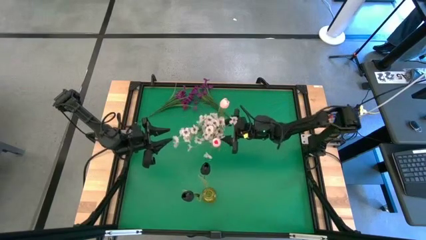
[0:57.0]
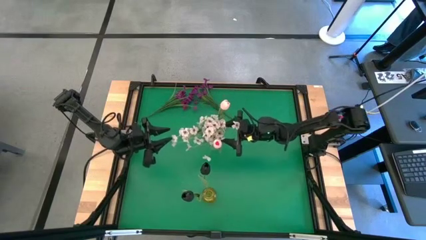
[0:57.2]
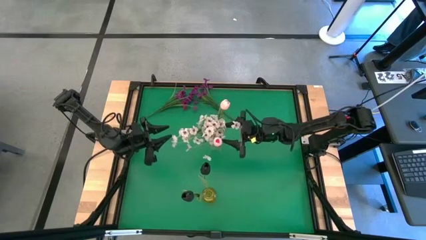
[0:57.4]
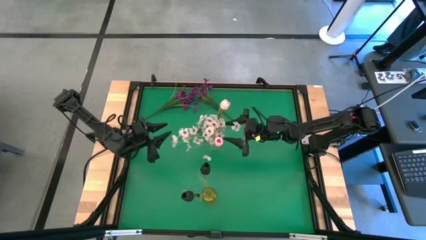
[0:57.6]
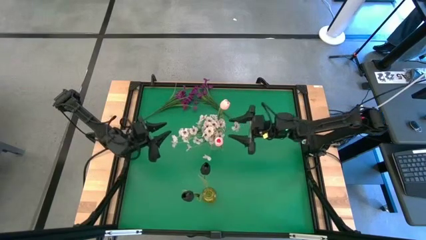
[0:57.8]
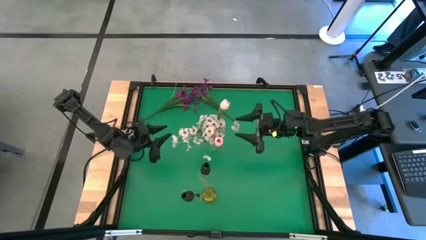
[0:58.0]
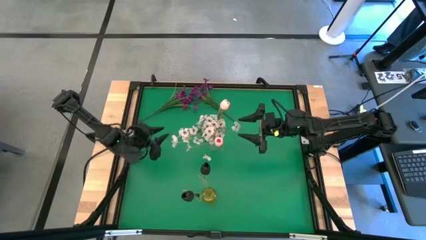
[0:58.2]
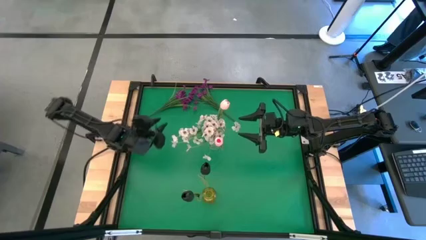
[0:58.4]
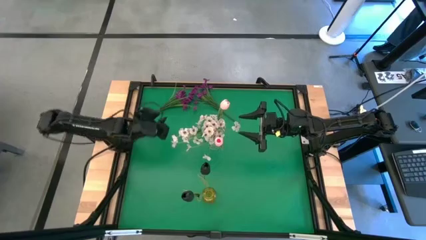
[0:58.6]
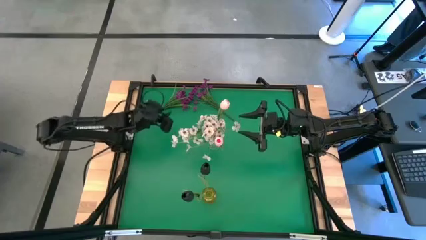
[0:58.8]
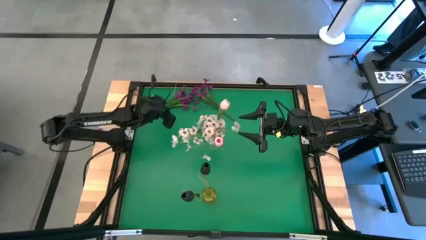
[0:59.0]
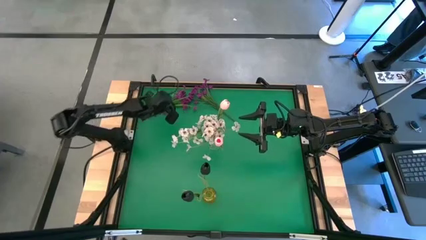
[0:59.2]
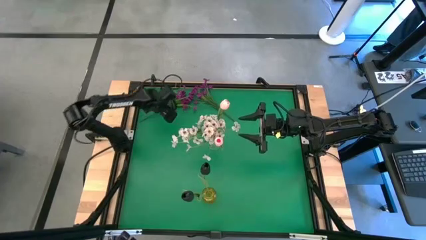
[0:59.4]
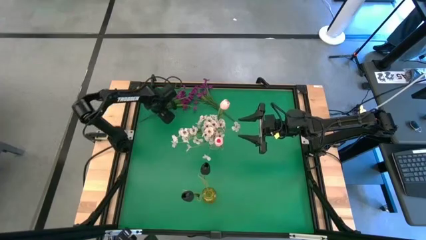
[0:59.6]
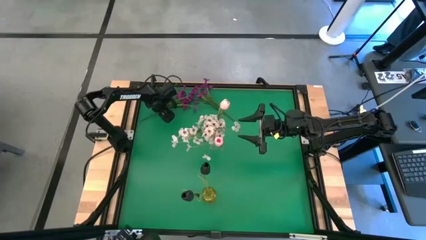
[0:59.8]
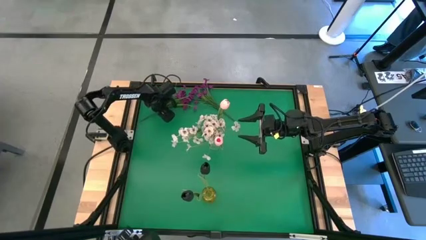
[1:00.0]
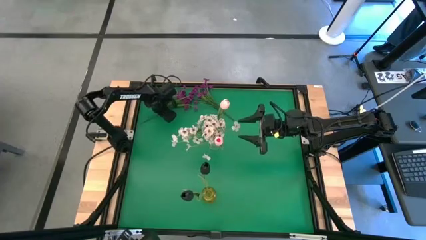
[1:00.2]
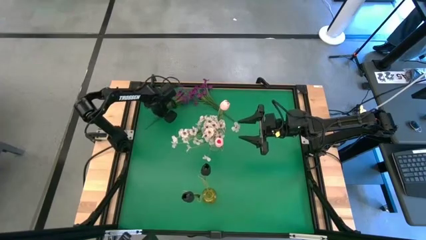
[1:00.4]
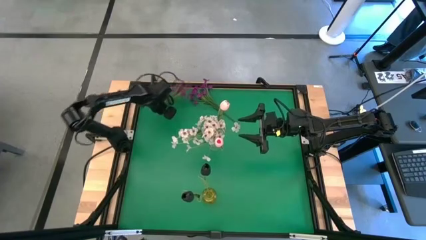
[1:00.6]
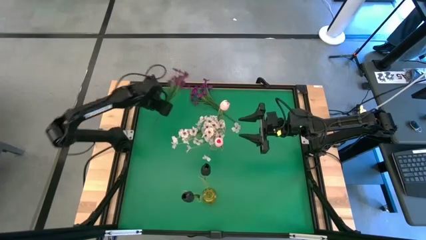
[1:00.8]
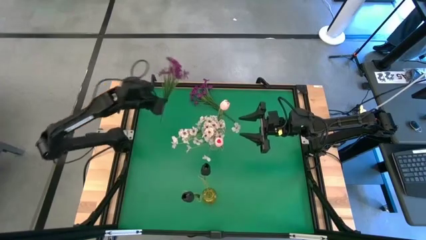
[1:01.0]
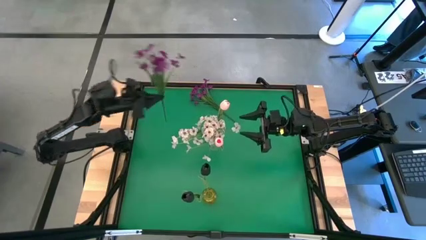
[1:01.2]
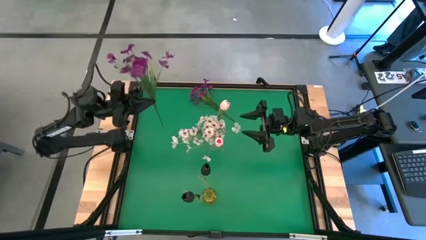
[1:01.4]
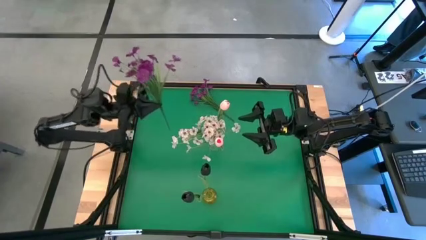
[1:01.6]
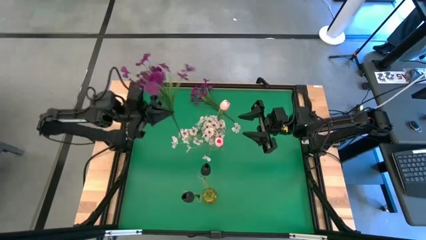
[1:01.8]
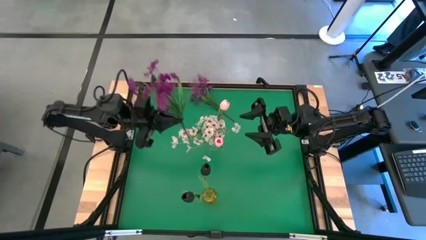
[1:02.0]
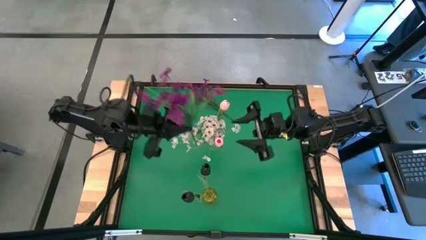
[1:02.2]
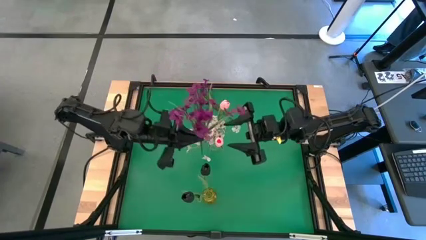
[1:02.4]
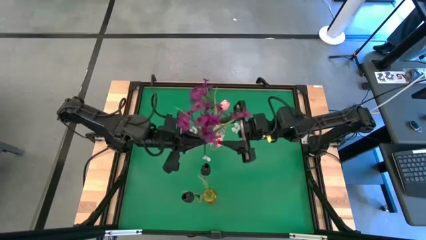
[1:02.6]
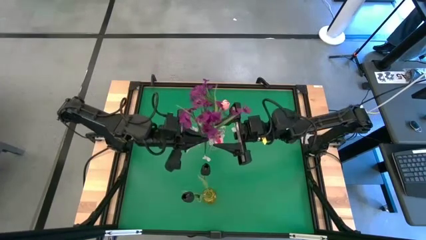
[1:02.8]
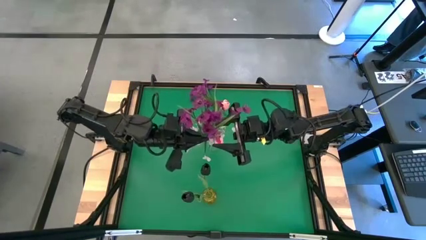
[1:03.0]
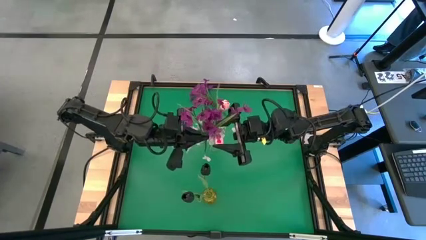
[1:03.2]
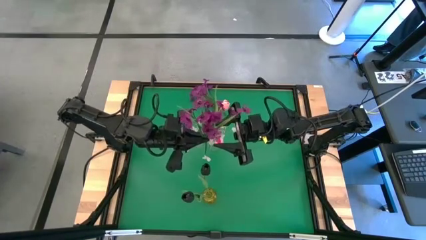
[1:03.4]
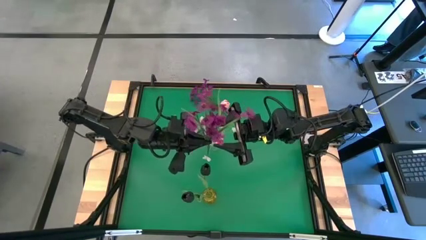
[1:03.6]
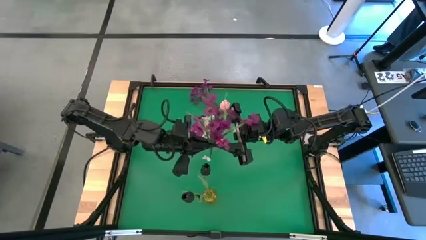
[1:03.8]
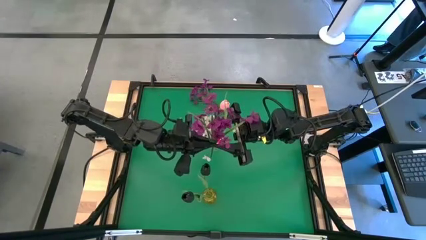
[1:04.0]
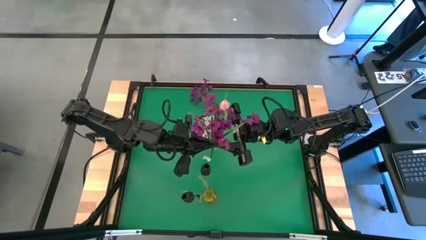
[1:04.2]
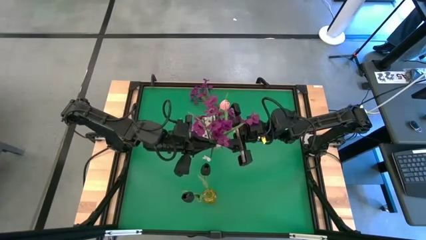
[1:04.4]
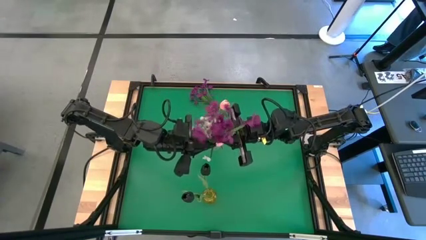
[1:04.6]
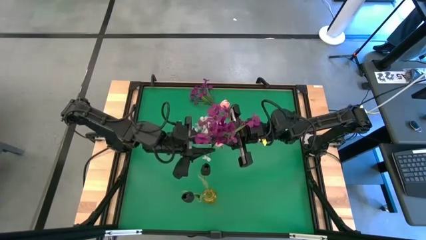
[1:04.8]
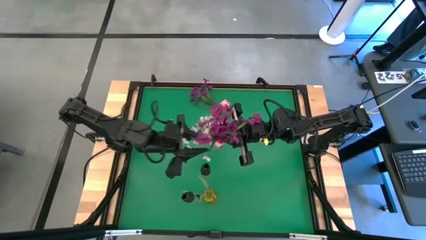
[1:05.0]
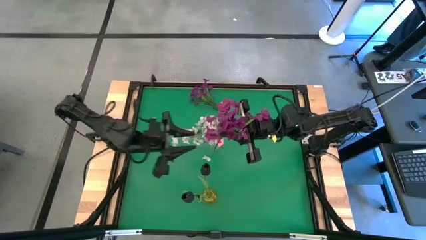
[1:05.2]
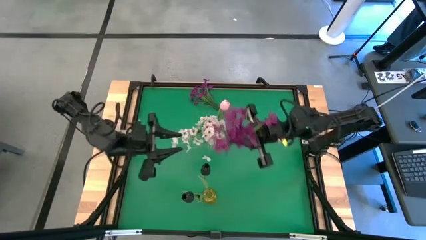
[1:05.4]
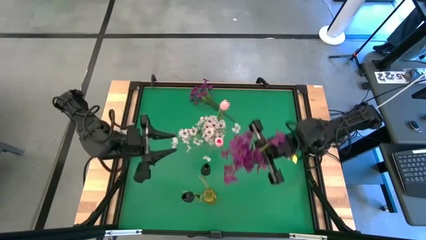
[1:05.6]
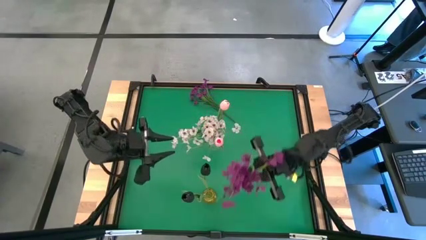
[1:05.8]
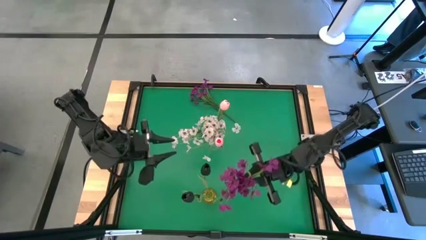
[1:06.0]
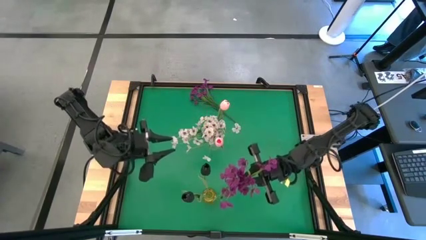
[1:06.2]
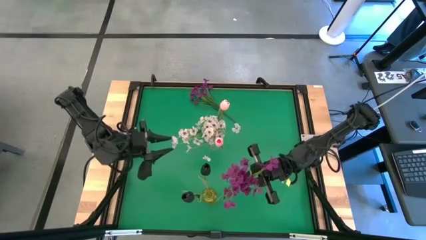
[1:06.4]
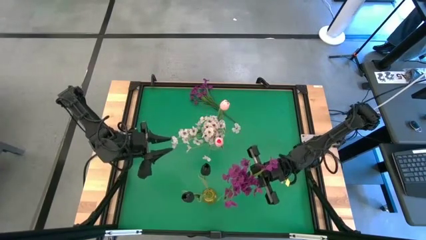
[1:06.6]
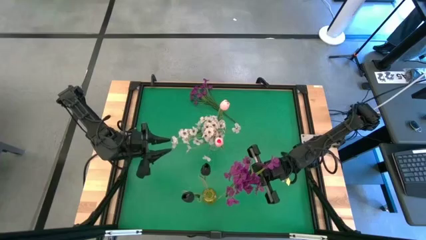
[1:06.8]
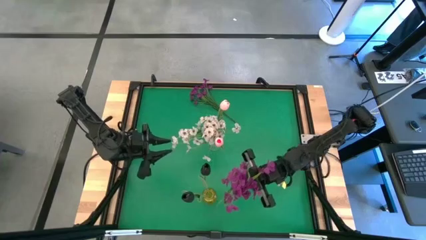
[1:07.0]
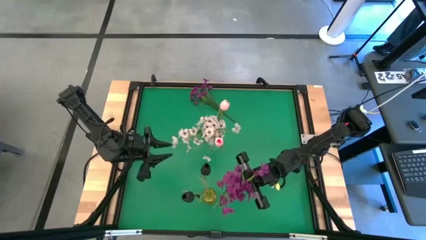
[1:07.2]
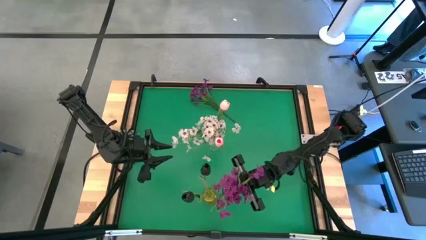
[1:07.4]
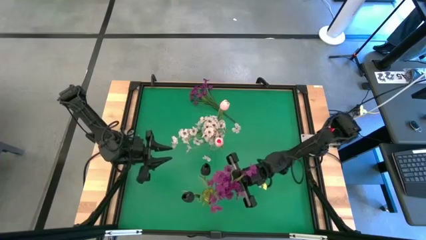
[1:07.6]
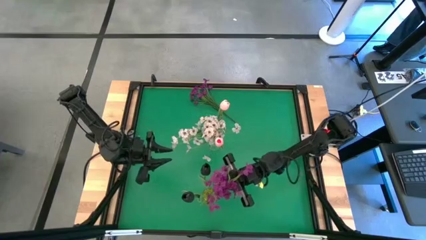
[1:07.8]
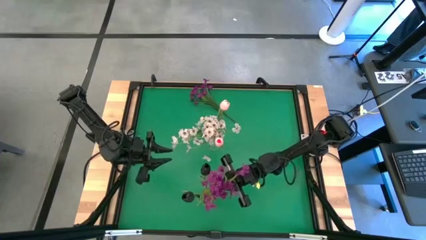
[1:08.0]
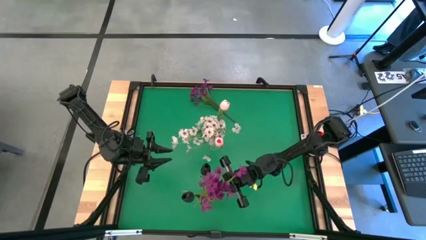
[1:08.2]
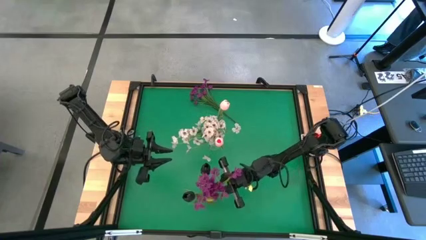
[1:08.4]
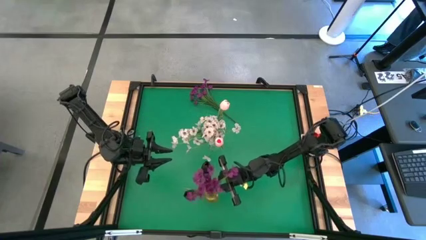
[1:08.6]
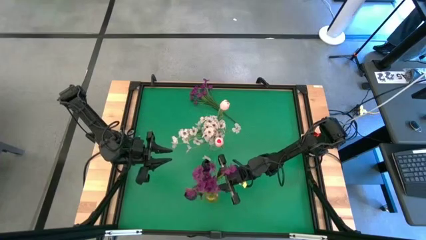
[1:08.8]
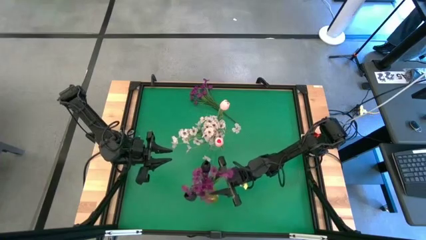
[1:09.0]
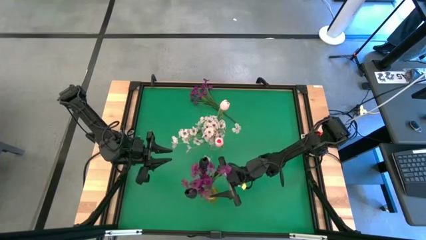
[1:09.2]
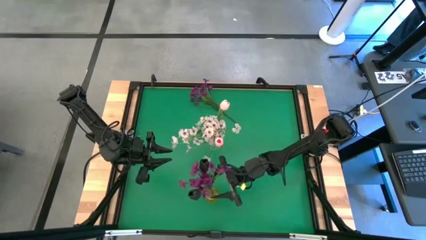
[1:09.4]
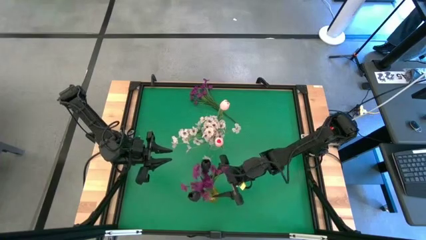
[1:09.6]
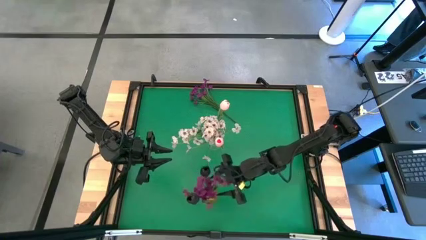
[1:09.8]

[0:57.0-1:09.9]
Task: Sort flowers into vase by color
Put the left violet flowers into the yellow crystal vase

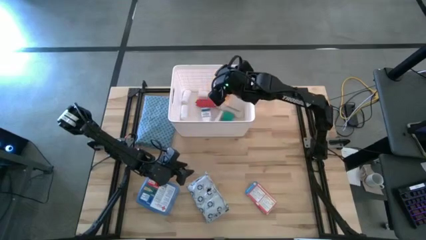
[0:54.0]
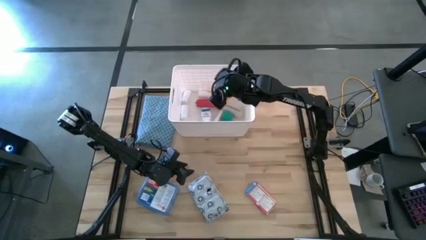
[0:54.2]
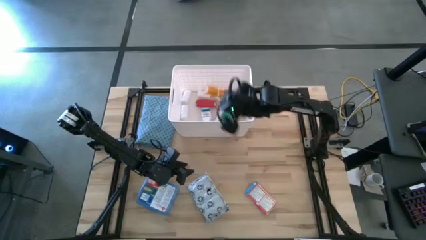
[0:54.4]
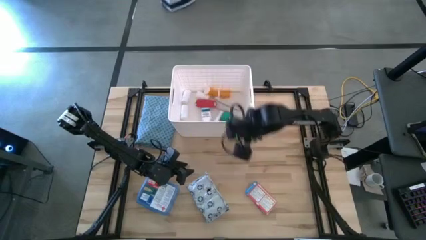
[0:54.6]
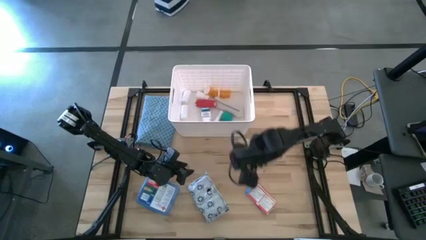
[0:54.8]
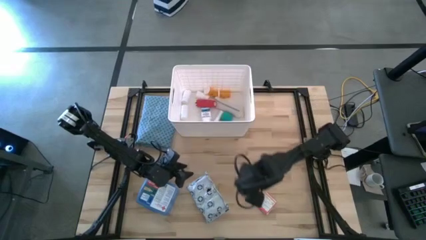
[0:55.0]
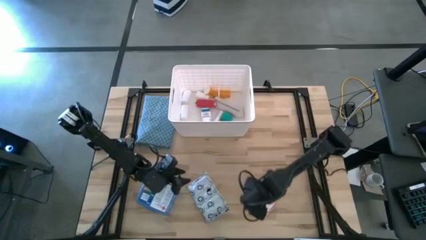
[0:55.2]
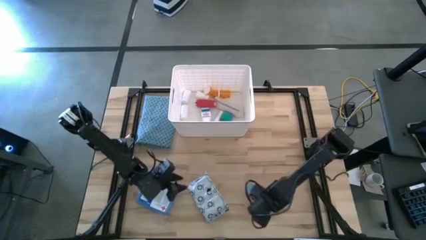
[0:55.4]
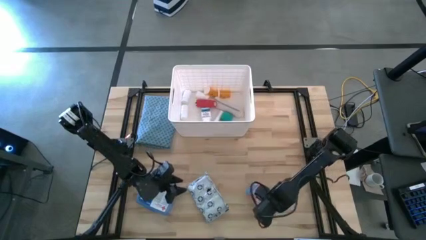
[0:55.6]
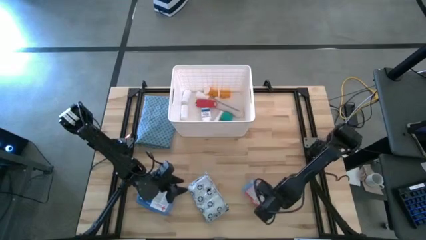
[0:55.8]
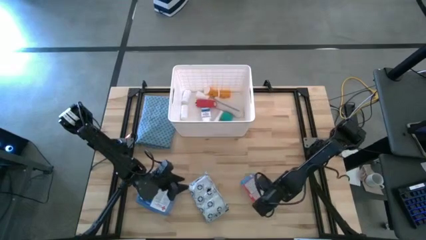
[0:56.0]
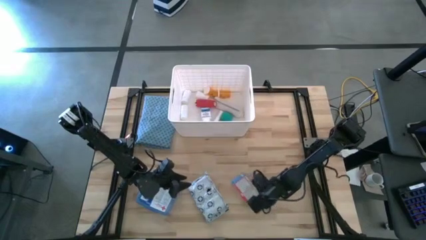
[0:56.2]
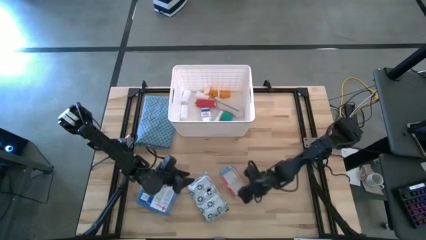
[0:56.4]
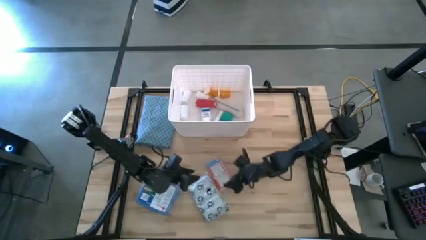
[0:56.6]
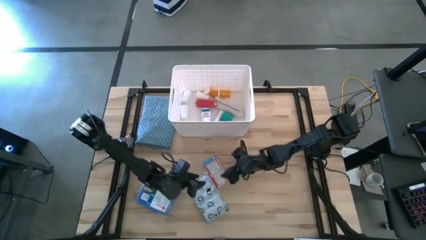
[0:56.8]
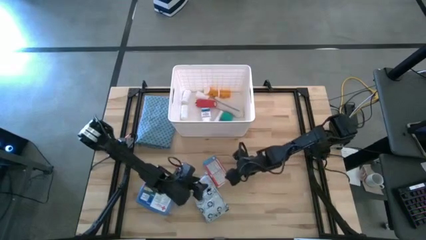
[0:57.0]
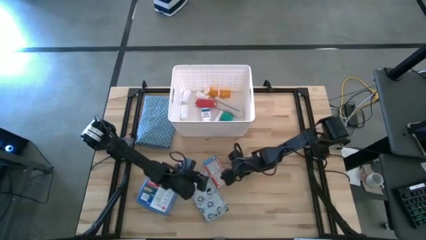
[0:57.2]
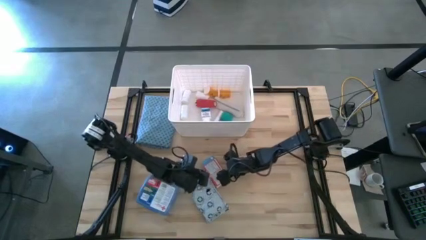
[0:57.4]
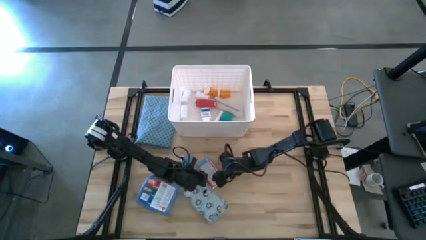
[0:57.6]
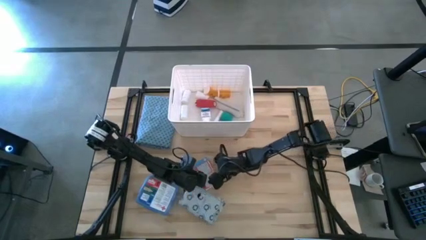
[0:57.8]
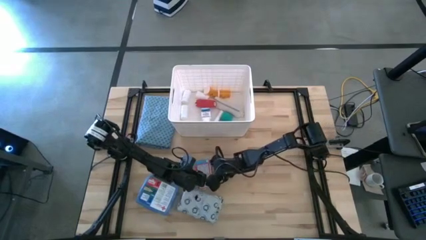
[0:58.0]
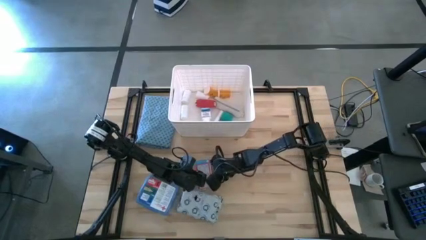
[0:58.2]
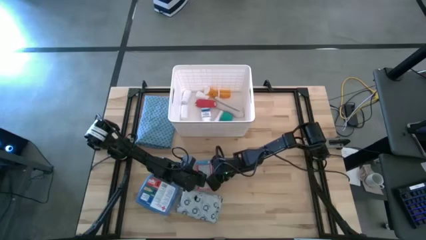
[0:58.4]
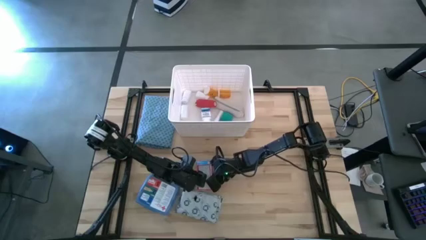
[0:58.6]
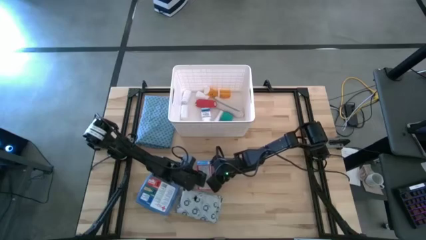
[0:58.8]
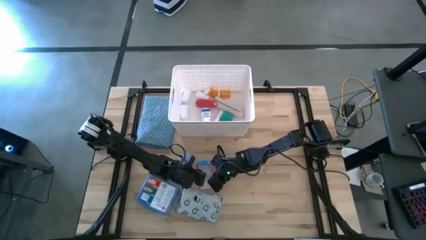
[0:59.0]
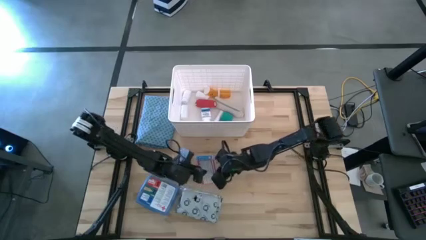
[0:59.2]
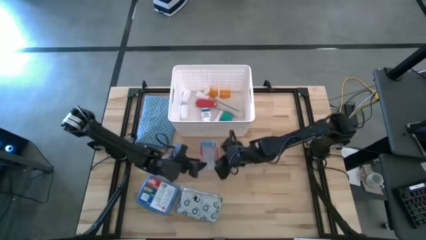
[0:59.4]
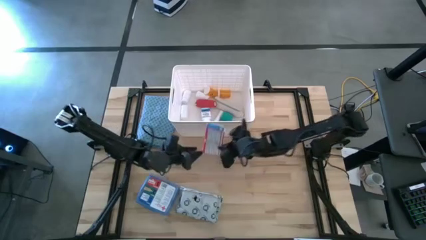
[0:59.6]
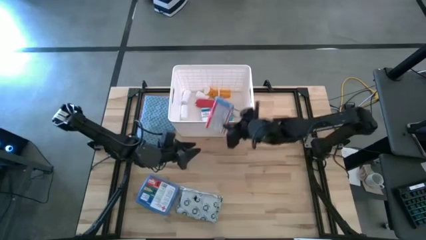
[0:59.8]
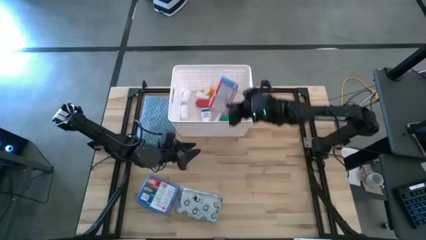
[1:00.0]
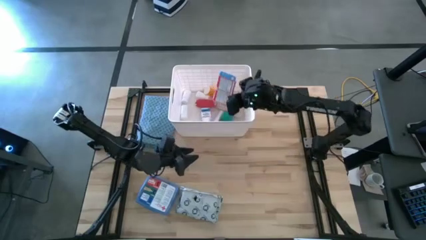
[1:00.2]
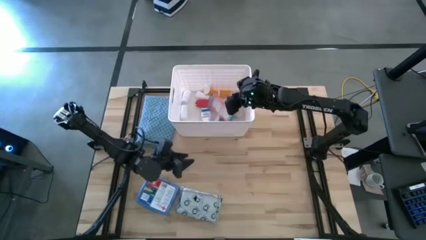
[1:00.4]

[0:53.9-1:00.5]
Task: Pick & place medical supplies in basket/bin
Put the red medicine box in the white bin
